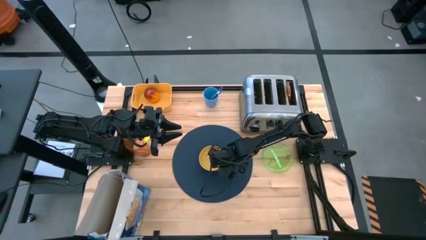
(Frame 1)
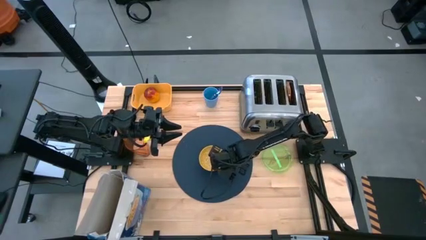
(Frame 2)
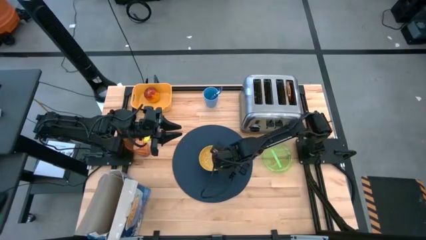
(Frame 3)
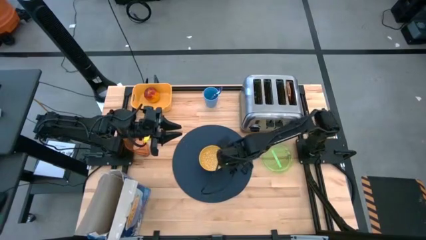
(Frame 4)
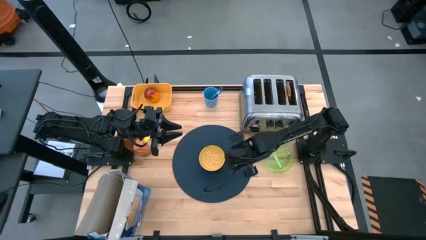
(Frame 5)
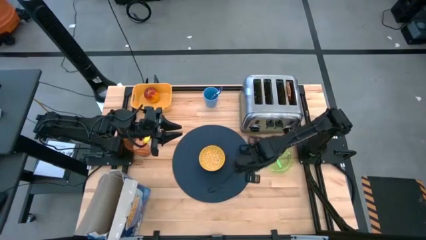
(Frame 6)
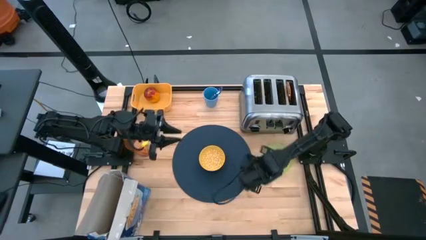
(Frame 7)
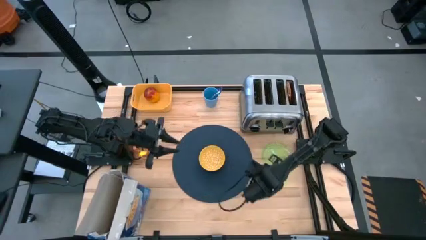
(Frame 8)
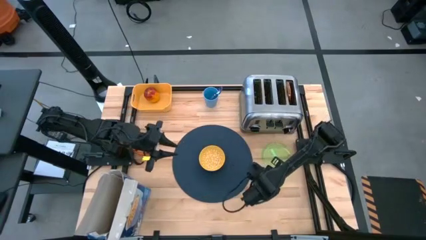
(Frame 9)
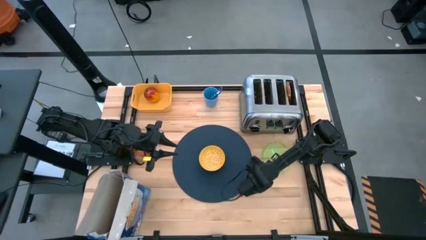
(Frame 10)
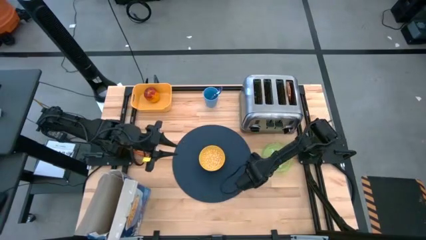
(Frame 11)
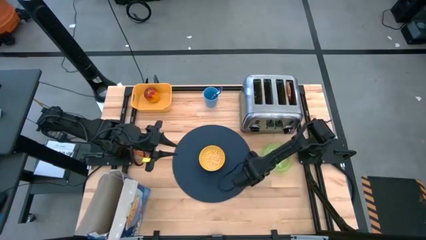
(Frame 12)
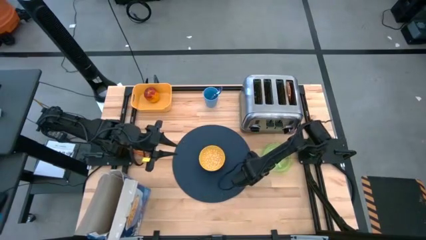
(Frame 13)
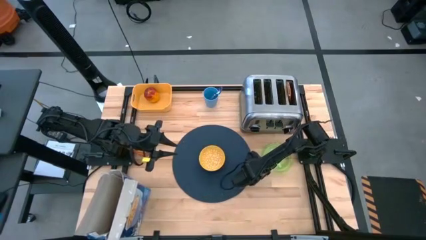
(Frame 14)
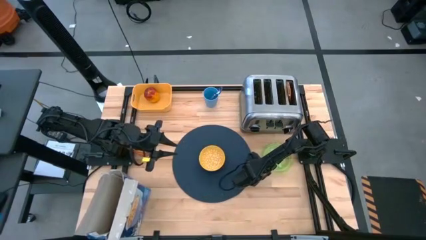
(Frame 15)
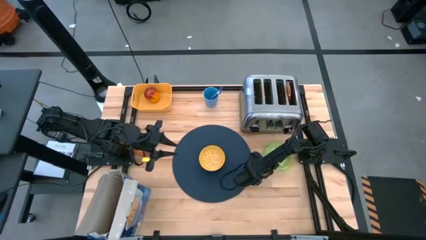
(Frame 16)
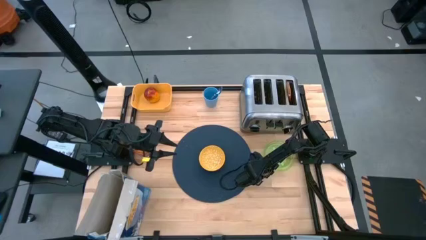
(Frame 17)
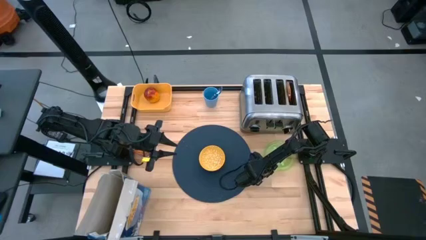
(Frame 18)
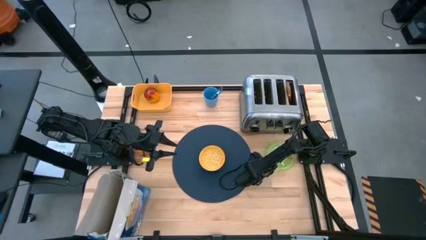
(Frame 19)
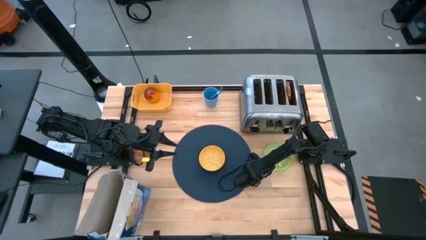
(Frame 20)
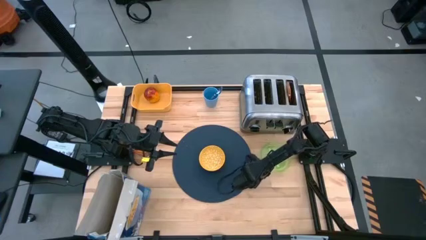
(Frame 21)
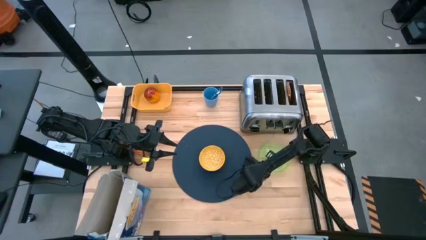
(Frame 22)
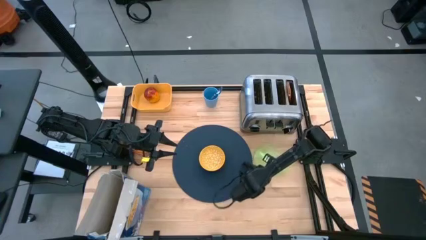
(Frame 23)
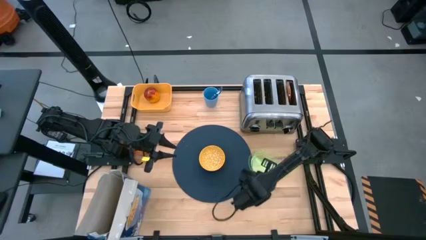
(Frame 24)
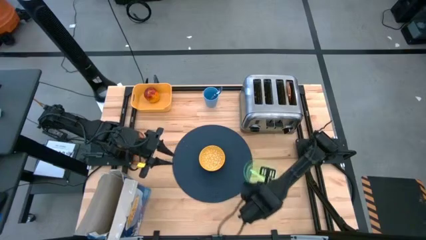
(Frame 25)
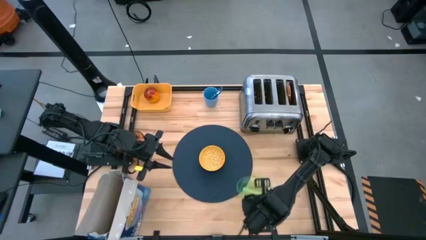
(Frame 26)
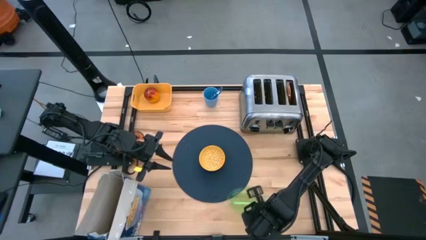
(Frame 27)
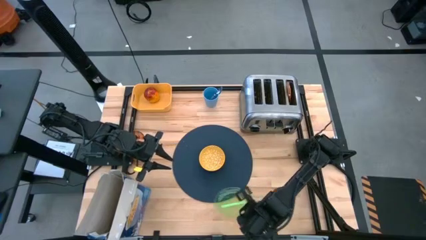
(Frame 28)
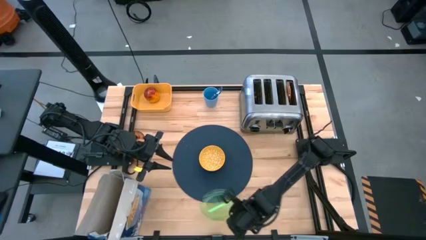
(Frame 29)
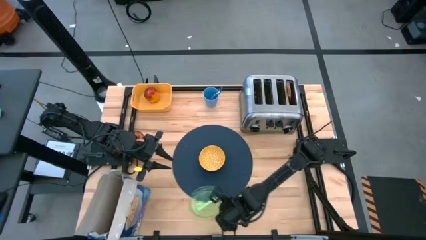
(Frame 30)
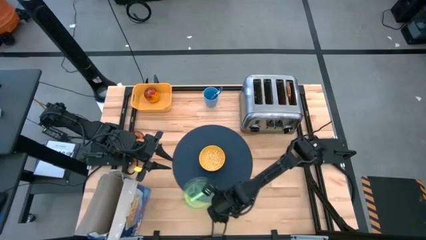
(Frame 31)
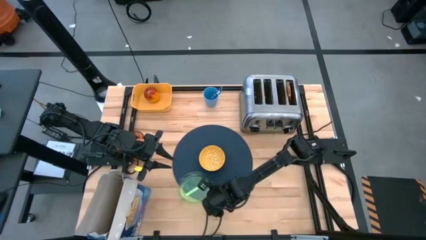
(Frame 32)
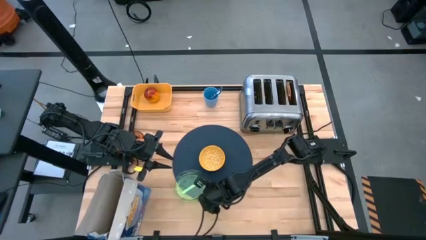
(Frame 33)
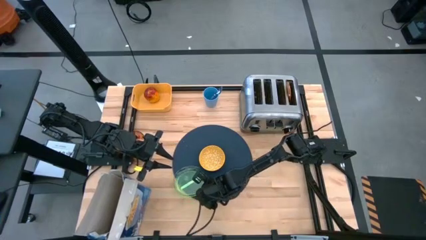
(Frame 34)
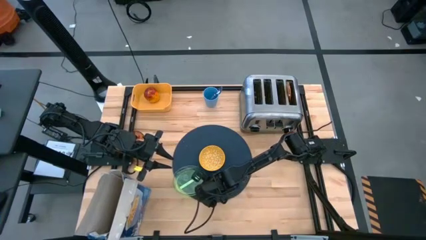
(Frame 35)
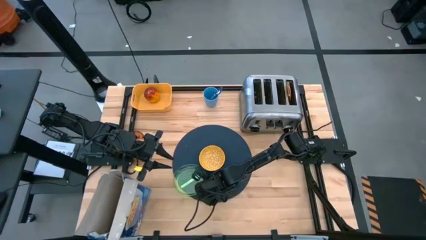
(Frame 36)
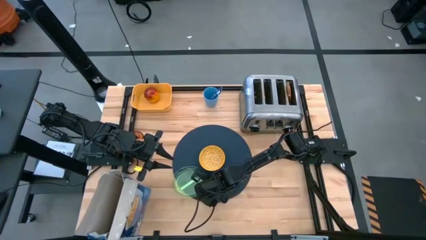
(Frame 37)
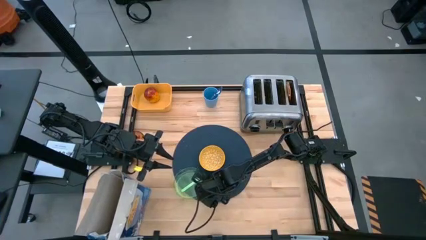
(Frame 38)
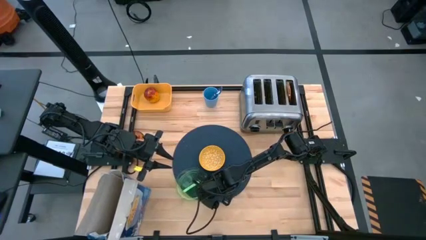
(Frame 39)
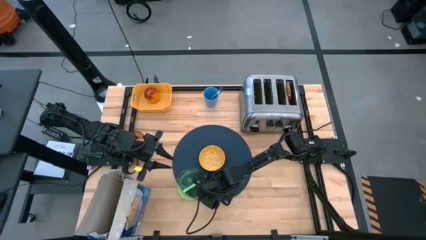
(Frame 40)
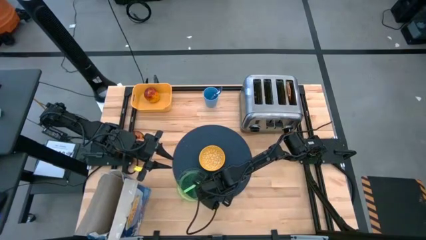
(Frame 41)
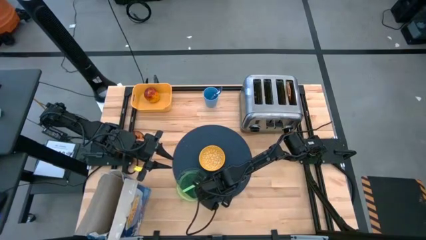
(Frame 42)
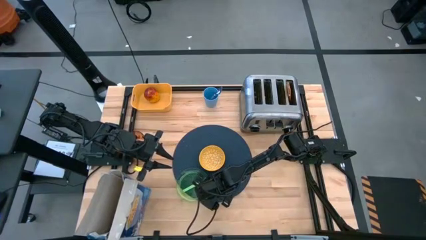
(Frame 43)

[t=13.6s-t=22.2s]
Task: Arrange a breakfast setting
Put the green plate on the dark blue table mat to the bottom right of the yellow bowl
